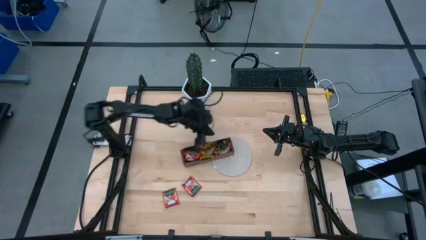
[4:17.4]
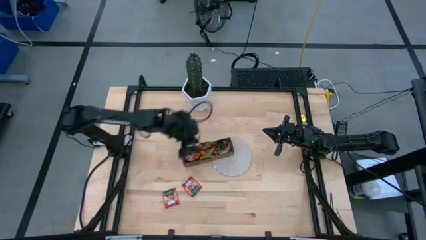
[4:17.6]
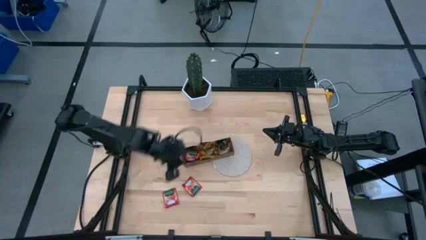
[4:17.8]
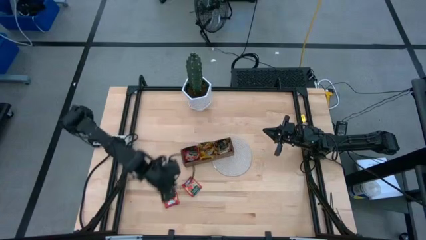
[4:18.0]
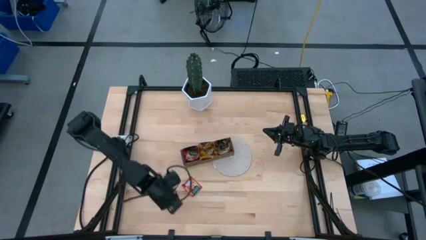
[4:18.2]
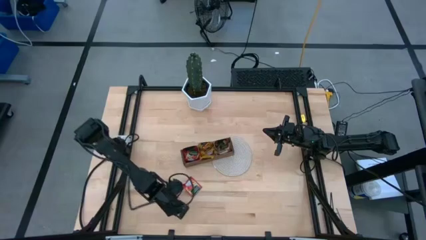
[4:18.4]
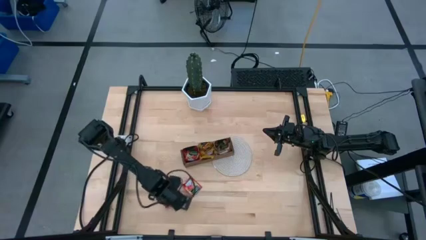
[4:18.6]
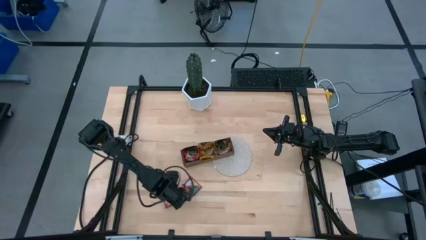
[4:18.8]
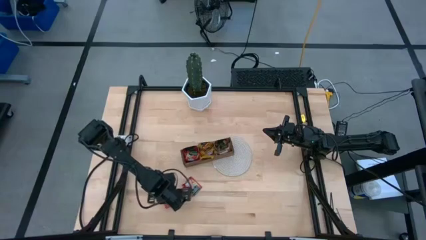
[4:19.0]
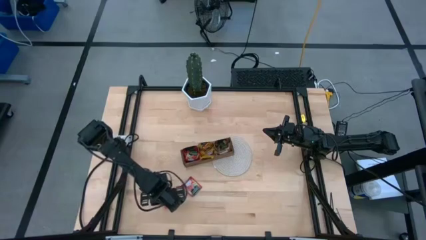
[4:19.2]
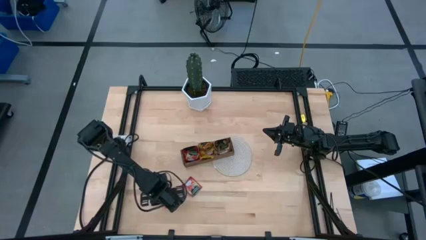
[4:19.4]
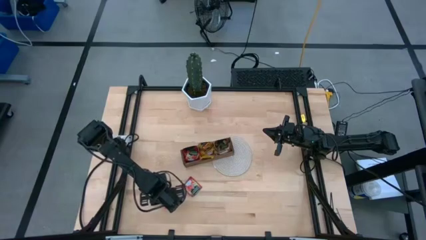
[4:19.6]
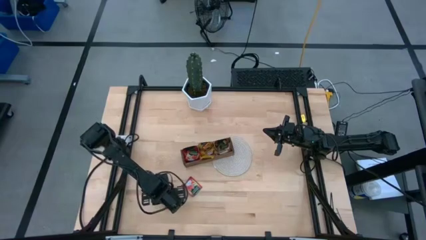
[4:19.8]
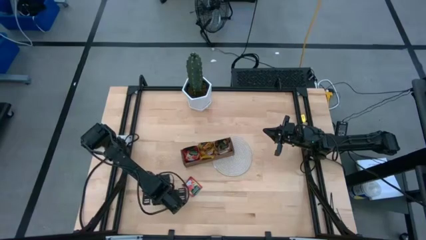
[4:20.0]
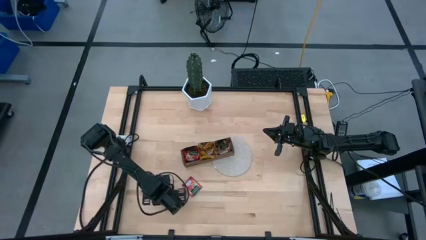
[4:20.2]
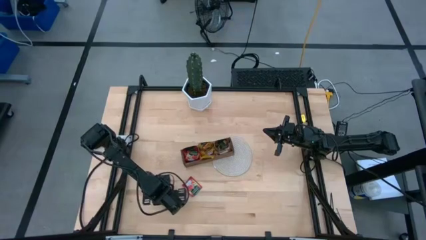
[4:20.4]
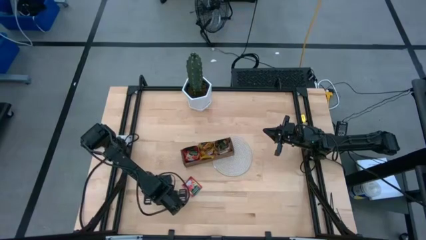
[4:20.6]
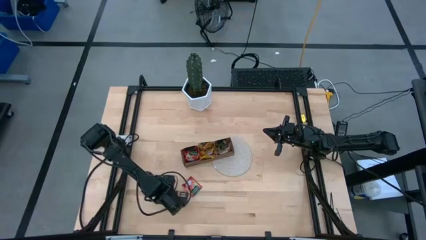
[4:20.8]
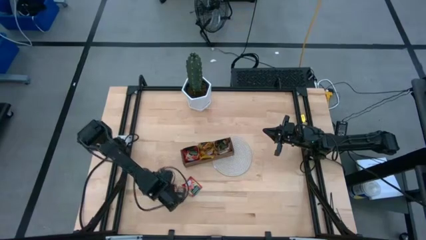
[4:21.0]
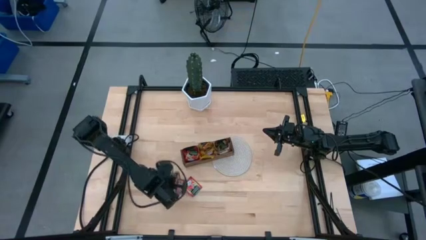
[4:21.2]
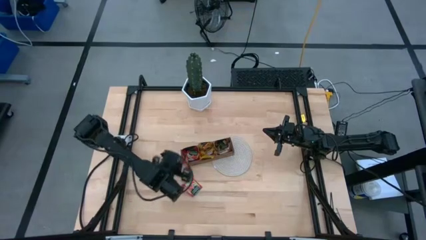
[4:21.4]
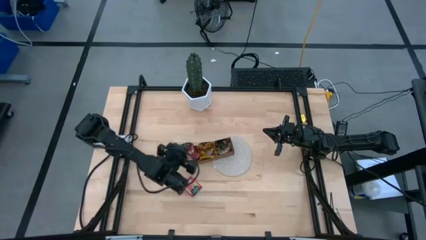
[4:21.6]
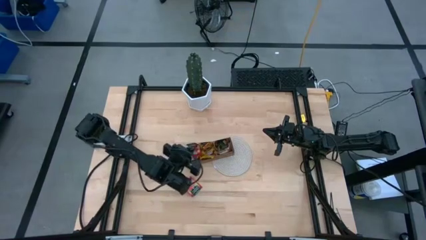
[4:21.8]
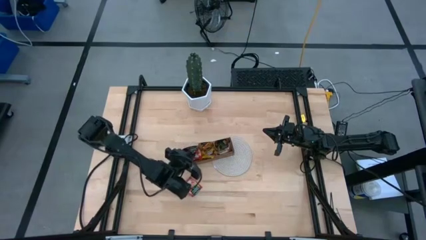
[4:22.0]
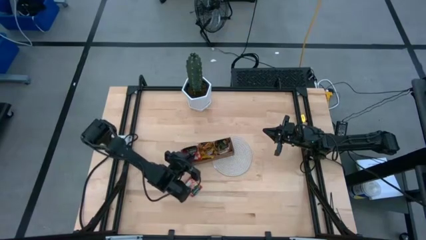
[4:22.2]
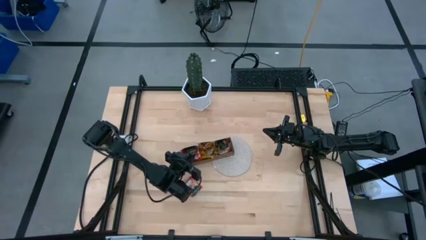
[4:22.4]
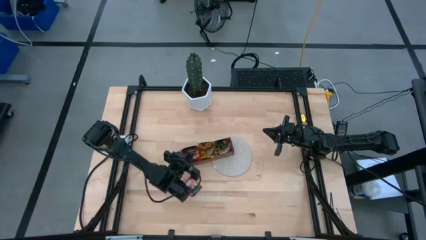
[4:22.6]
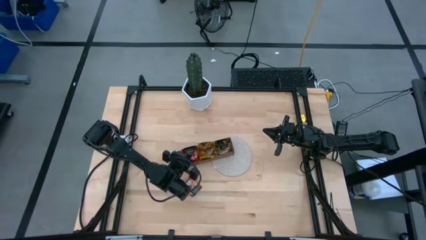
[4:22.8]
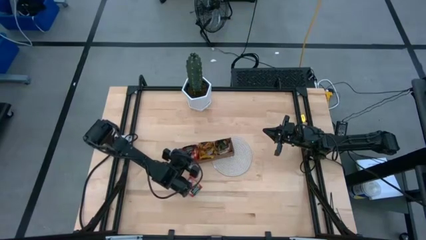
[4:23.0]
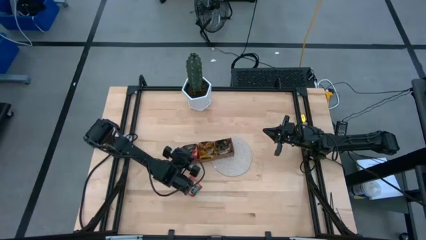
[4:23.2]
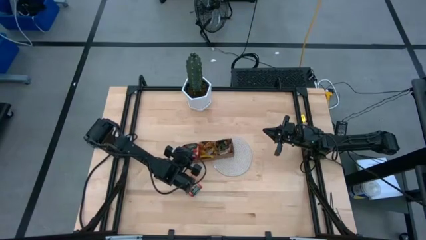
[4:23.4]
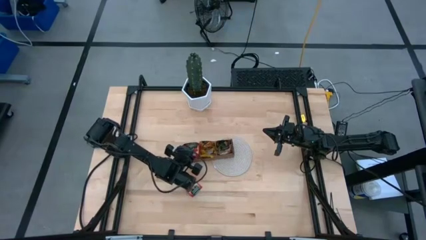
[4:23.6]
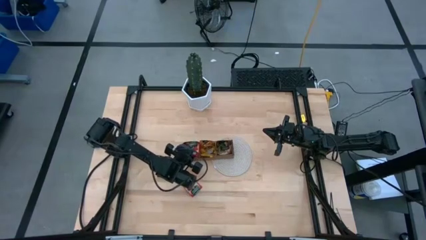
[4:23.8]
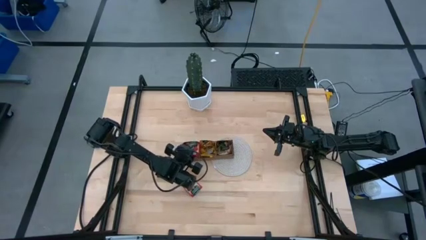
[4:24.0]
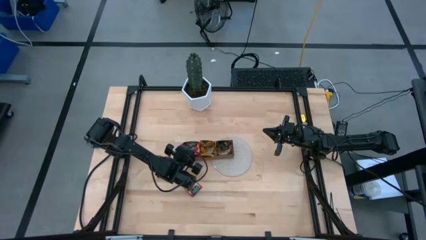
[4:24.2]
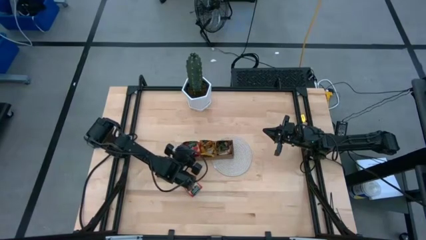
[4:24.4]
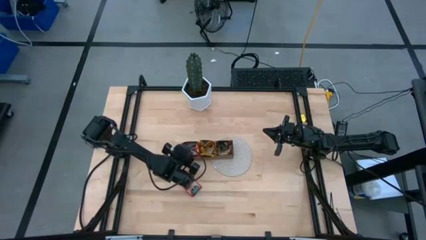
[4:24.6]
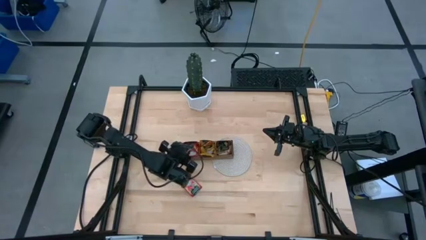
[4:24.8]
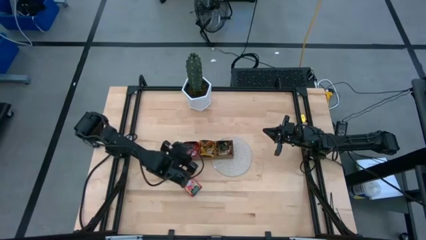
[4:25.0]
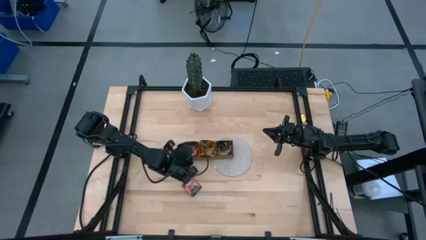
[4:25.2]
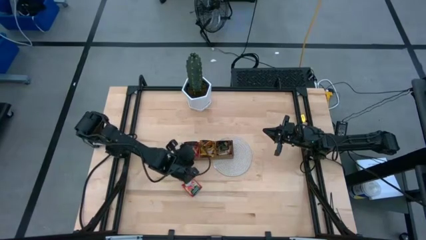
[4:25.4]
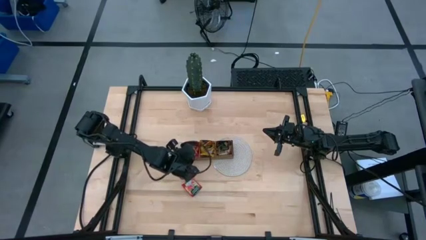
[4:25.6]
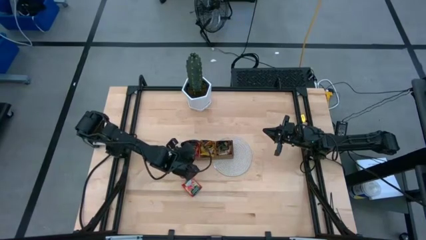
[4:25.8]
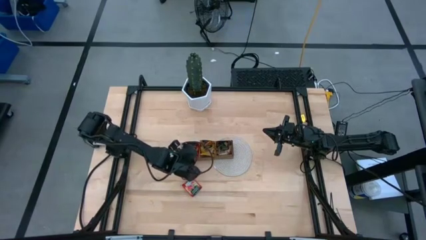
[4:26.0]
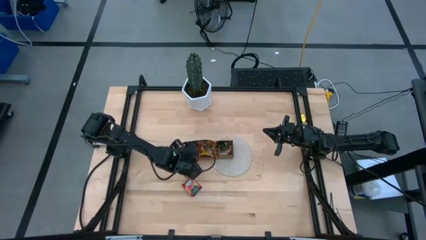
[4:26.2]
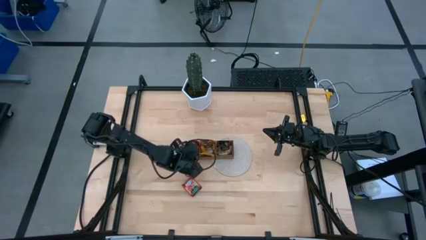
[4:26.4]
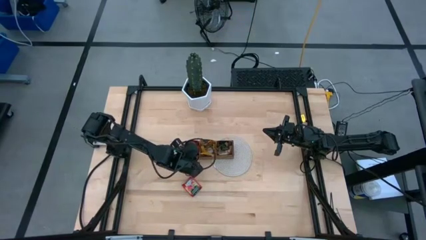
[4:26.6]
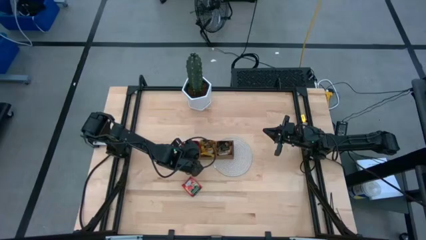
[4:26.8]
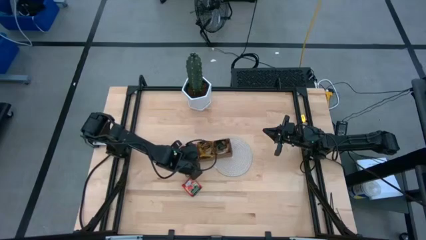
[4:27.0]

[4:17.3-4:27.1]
Task: Pick & Place Tea
Put the red tea bag into the left section of the wooden organizer

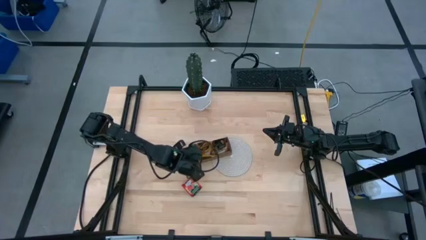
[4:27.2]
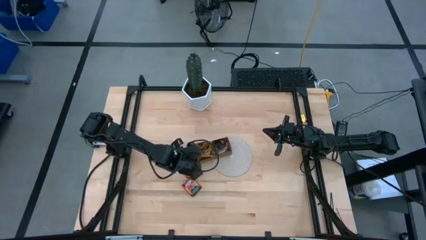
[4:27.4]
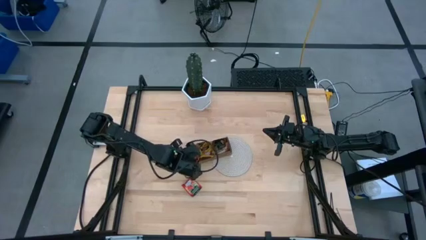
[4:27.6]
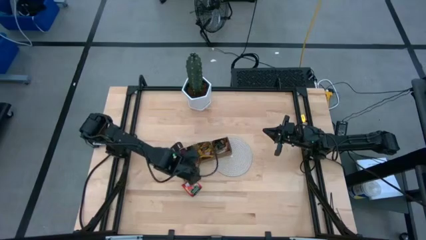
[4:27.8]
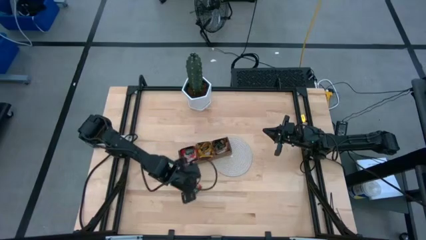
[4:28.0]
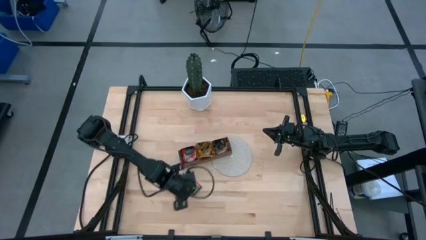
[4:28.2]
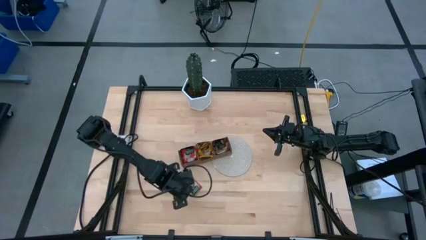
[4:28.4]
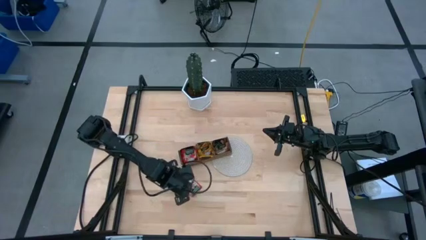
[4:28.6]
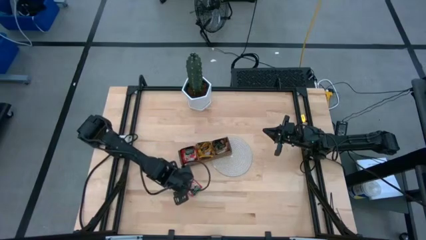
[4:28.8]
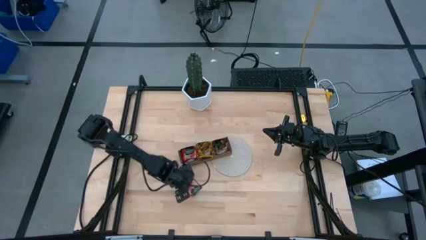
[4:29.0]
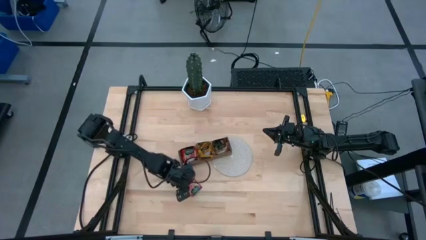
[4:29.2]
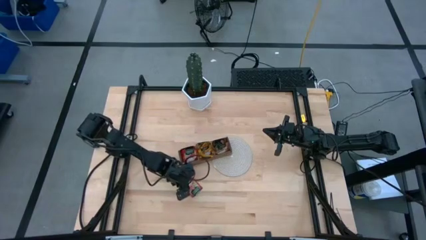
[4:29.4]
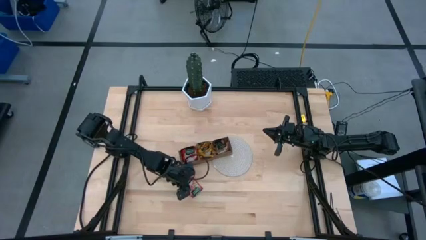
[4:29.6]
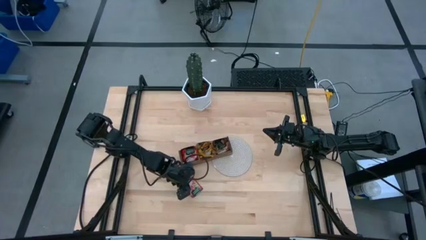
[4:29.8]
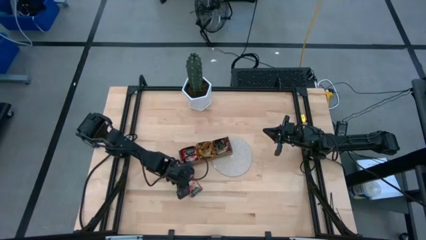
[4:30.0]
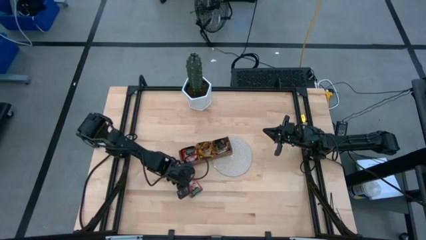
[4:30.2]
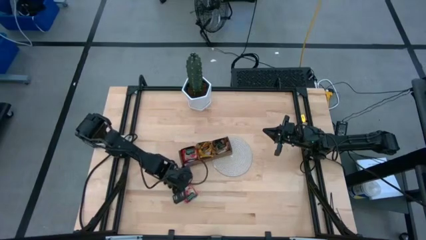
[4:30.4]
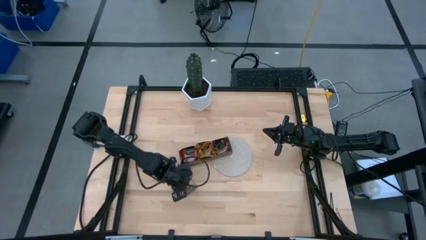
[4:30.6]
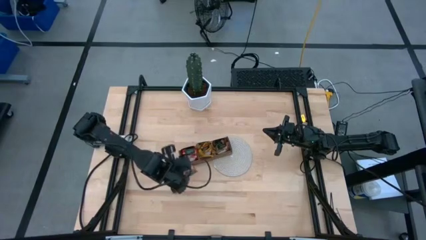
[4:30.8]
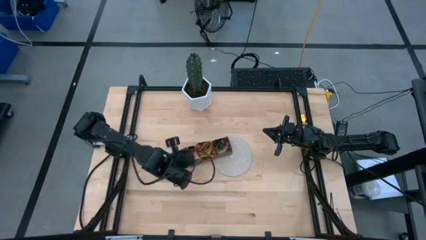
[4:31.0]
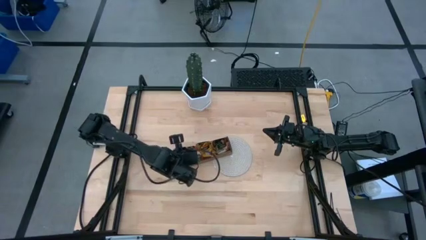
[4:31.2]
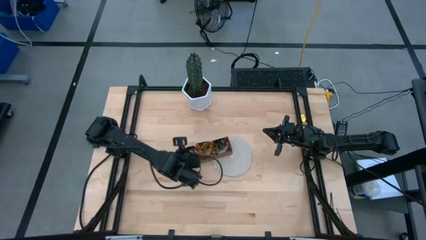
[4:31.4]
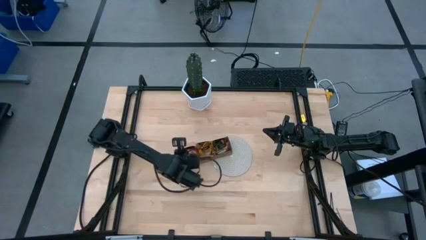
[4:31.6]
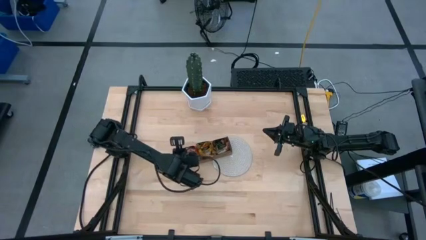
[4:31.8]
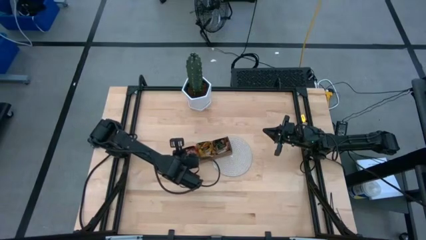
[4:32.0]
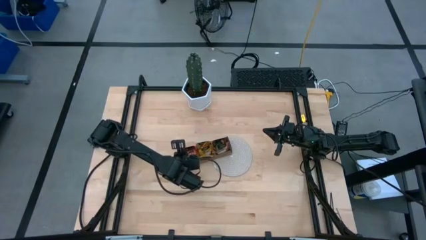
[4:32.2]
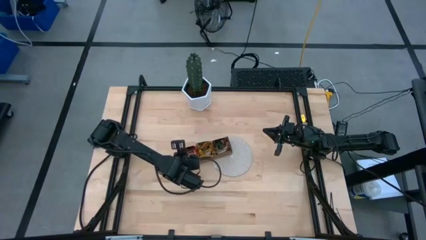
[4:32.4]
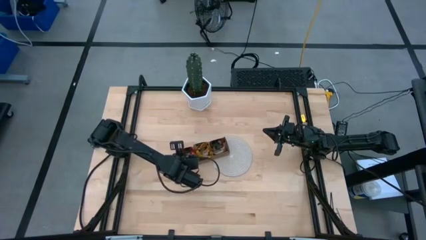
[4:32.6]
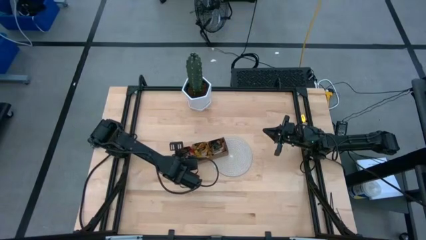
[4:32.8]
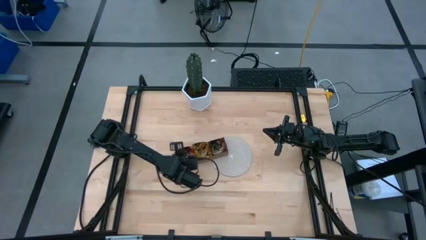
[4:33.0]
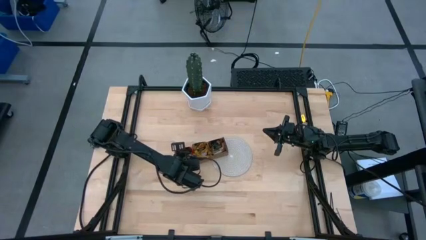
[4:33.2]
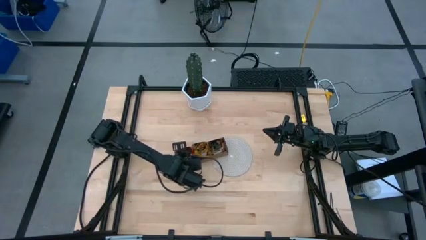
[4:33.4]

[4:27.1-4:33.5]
Put the red tea bag into the left section of the wooden organizer

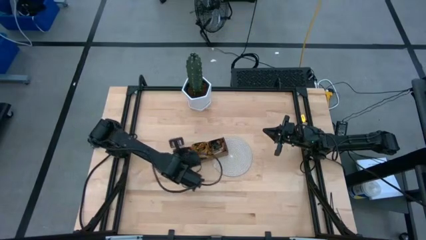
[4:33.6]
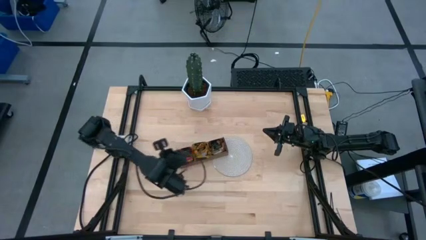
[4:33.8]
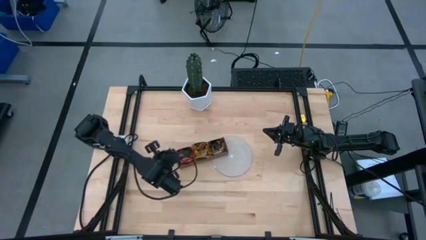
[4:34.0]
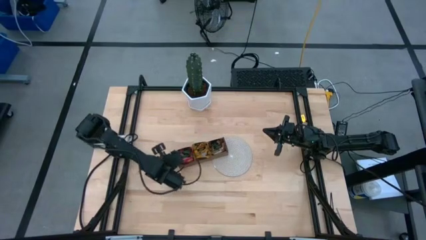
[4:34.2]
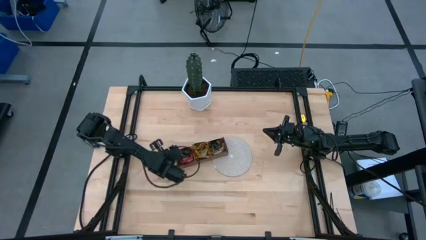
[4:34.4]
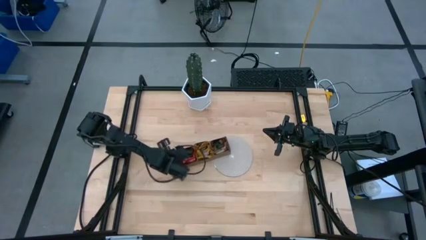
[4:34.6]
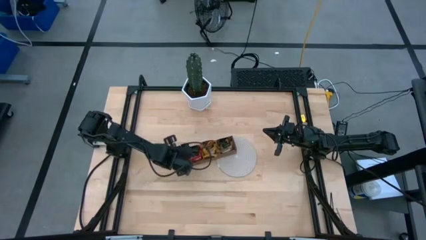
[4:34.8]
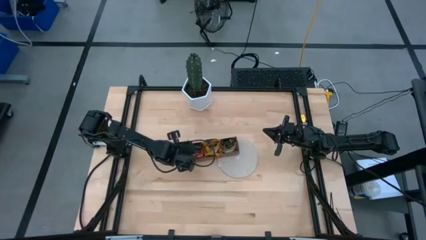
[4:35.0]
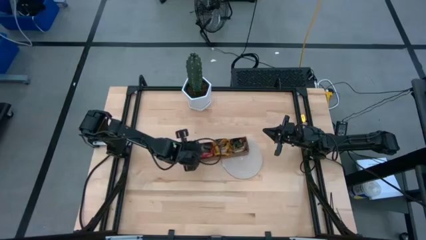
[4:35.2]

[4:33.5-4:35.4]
Adjust the wooden organizer
